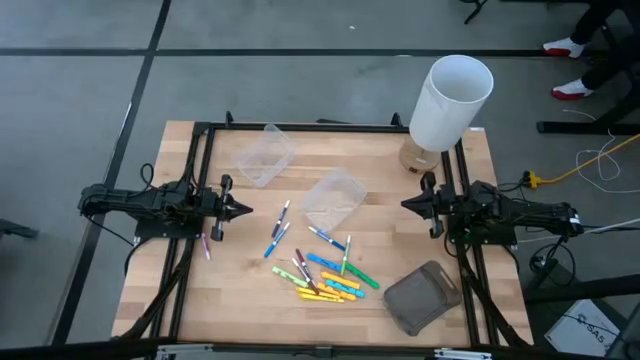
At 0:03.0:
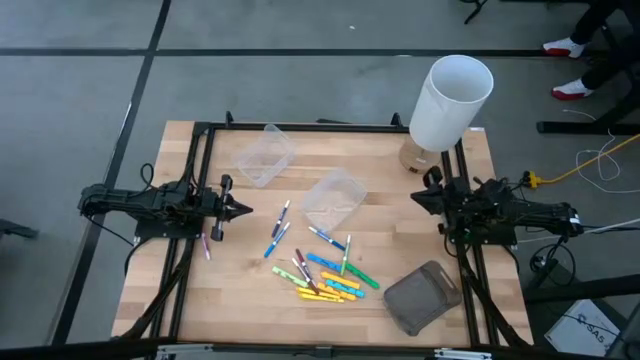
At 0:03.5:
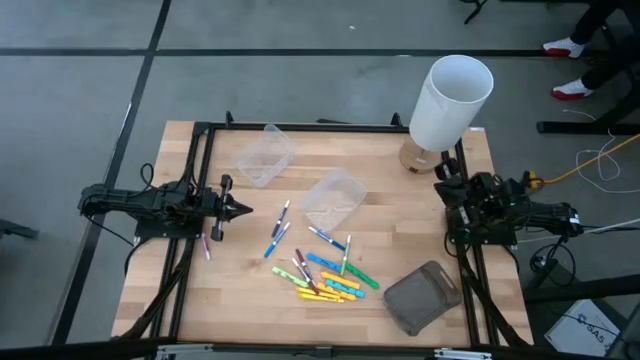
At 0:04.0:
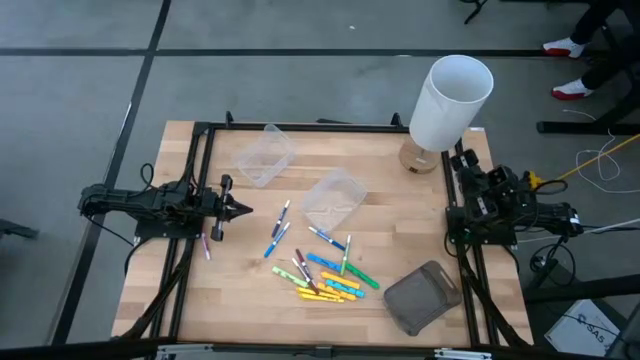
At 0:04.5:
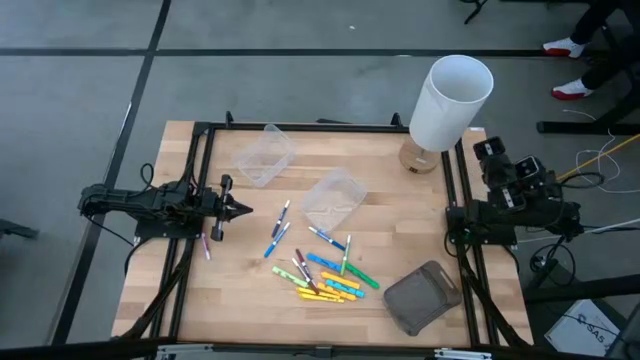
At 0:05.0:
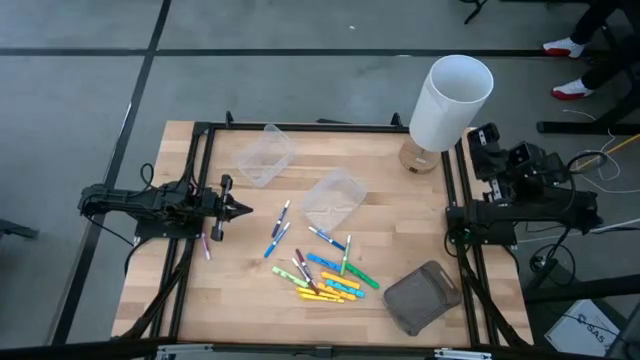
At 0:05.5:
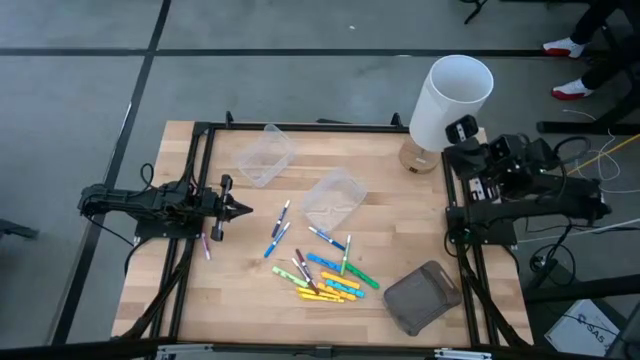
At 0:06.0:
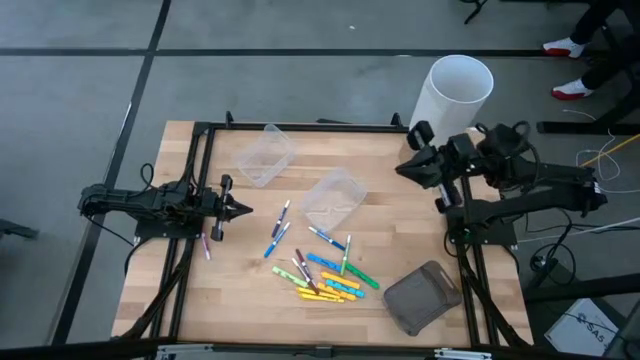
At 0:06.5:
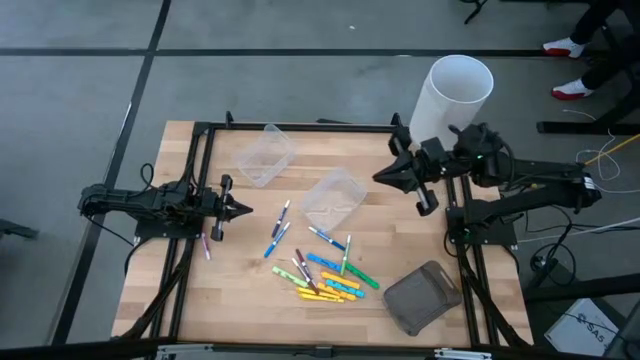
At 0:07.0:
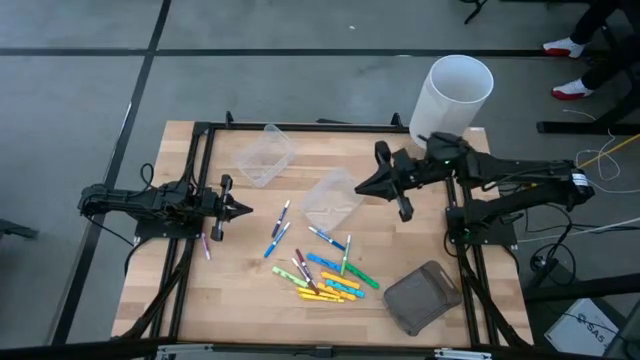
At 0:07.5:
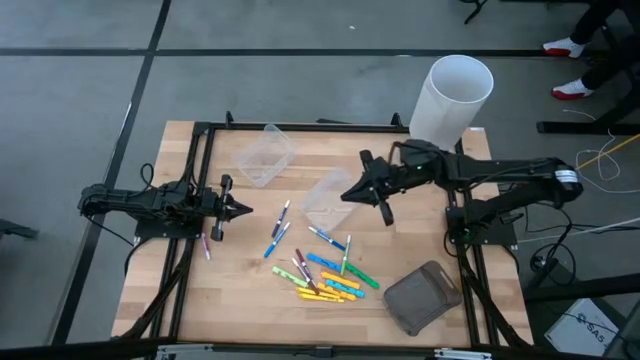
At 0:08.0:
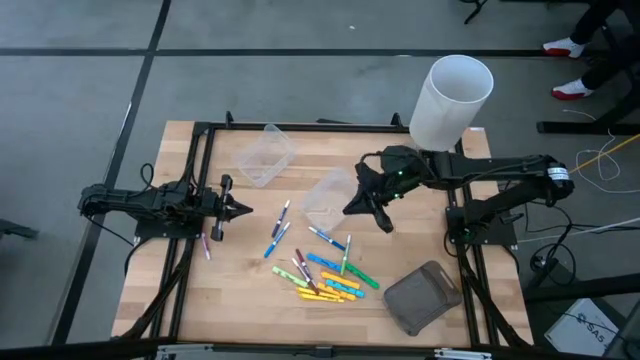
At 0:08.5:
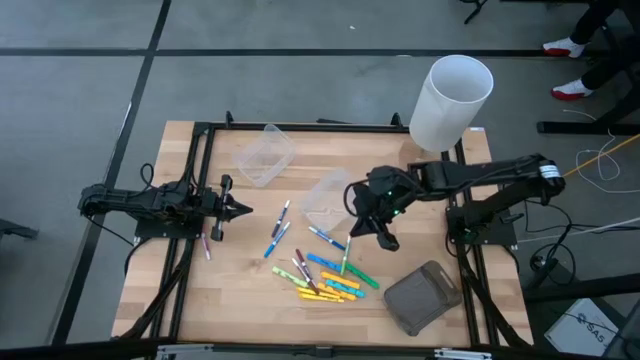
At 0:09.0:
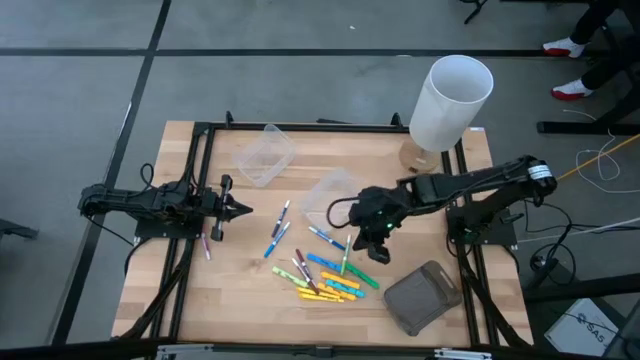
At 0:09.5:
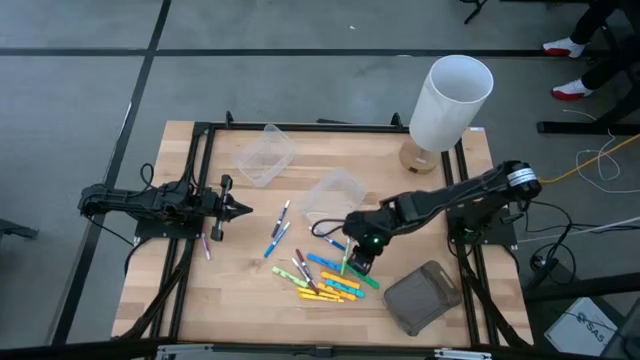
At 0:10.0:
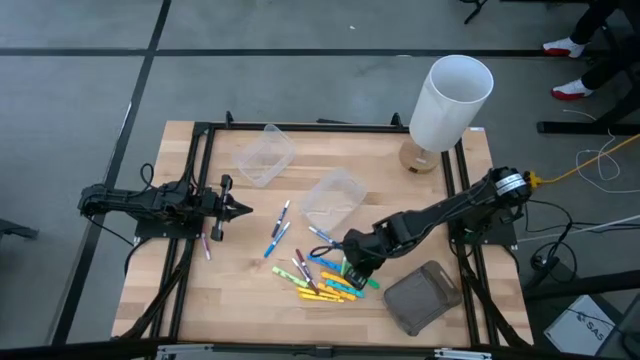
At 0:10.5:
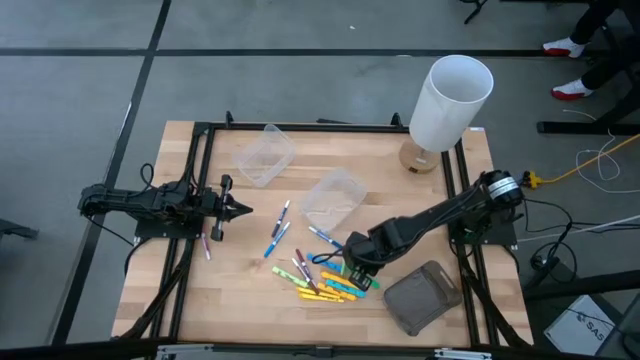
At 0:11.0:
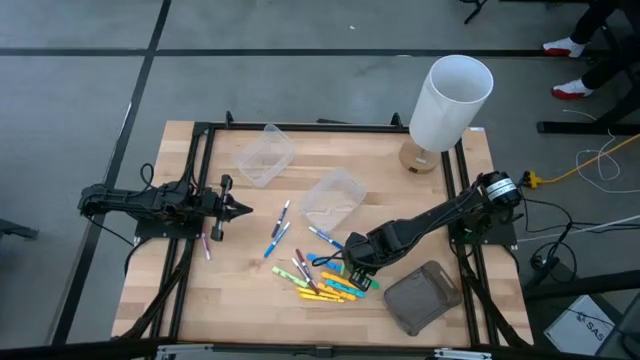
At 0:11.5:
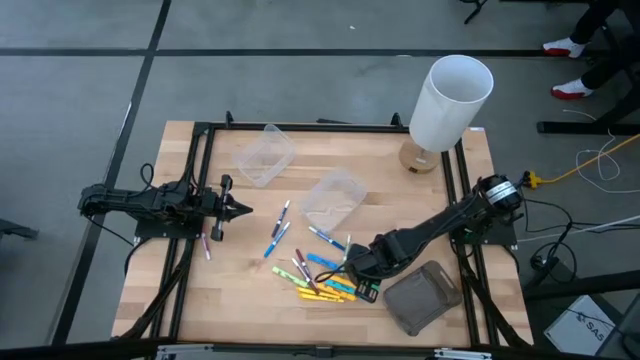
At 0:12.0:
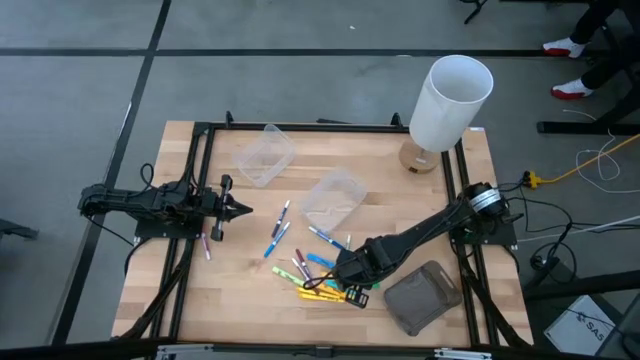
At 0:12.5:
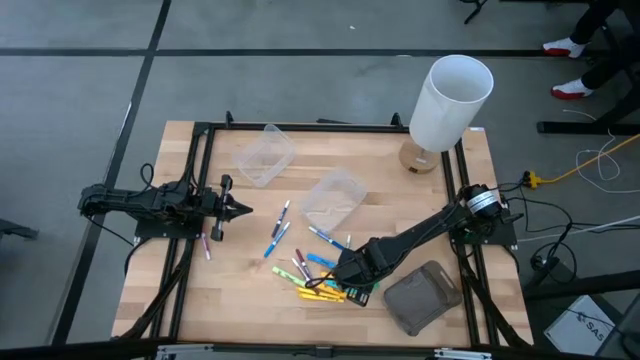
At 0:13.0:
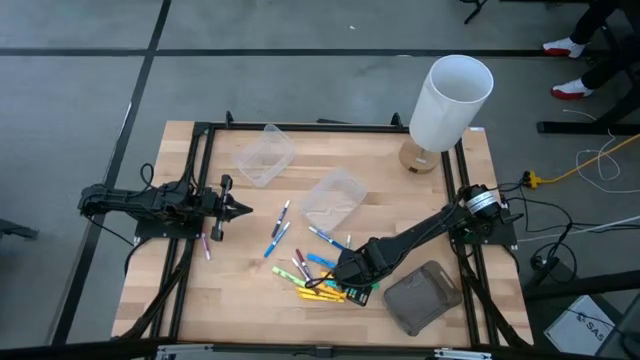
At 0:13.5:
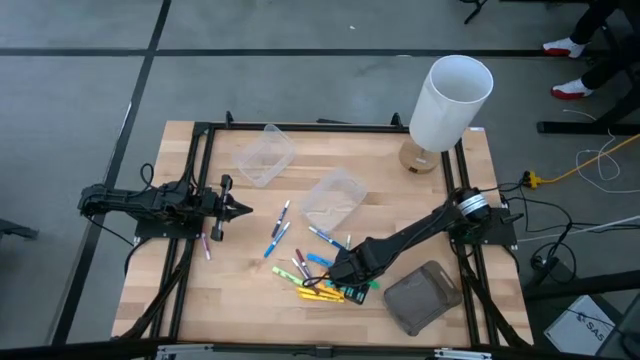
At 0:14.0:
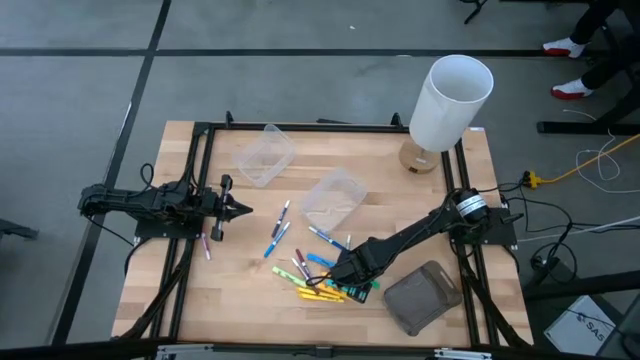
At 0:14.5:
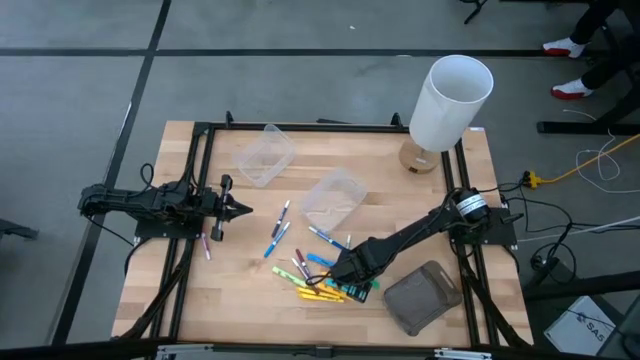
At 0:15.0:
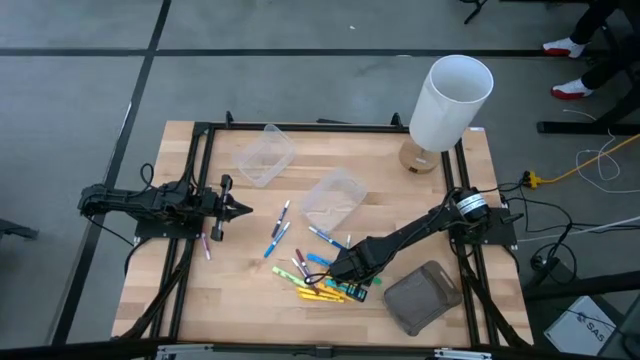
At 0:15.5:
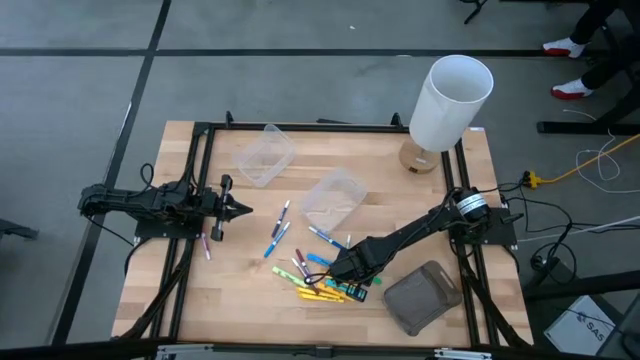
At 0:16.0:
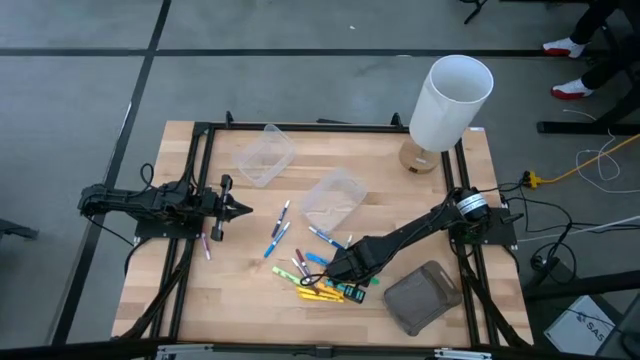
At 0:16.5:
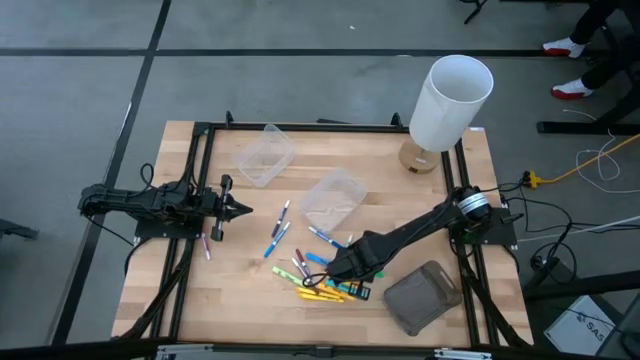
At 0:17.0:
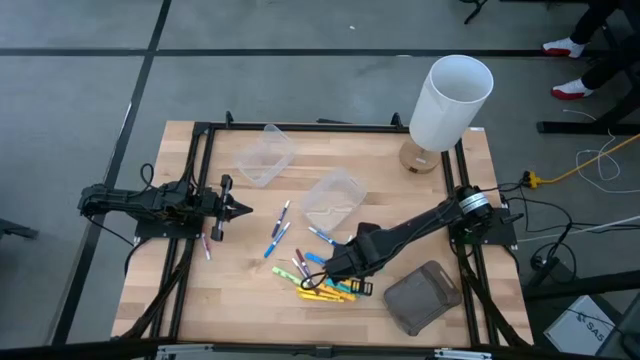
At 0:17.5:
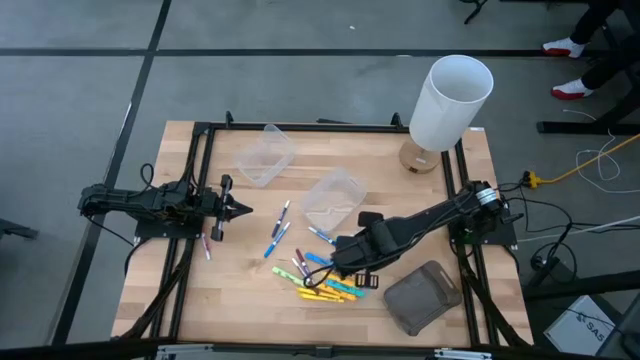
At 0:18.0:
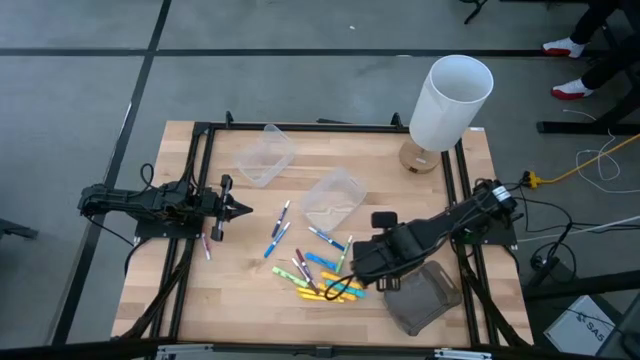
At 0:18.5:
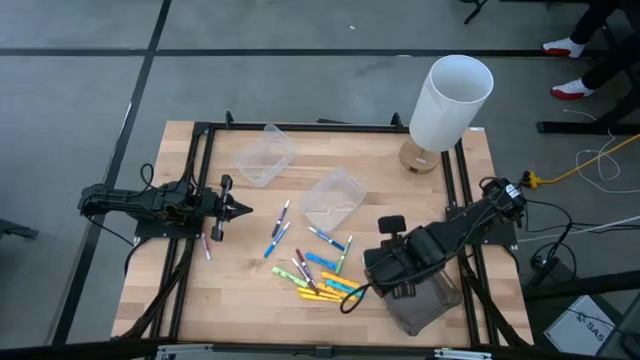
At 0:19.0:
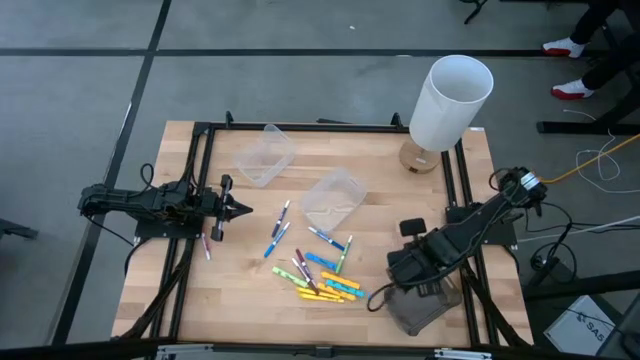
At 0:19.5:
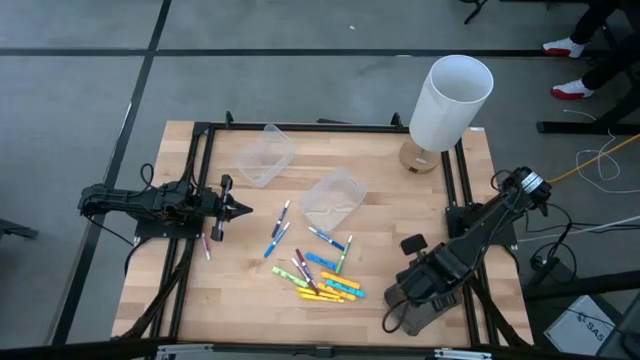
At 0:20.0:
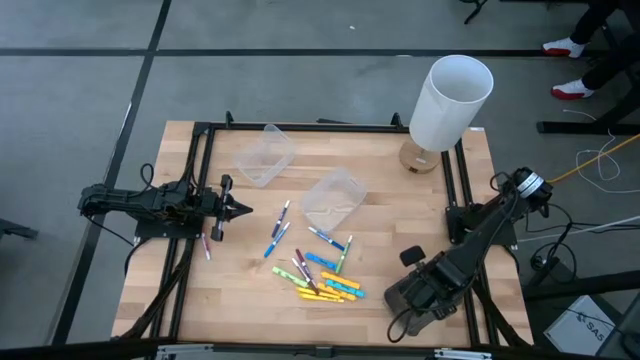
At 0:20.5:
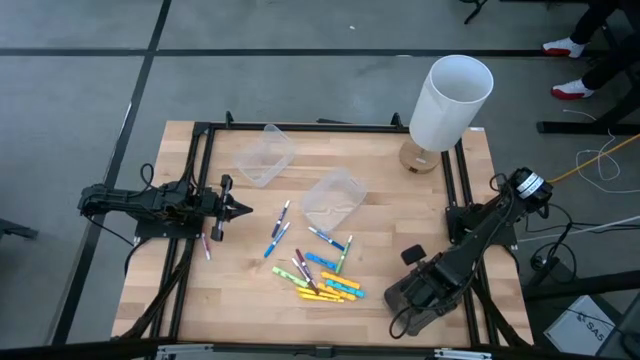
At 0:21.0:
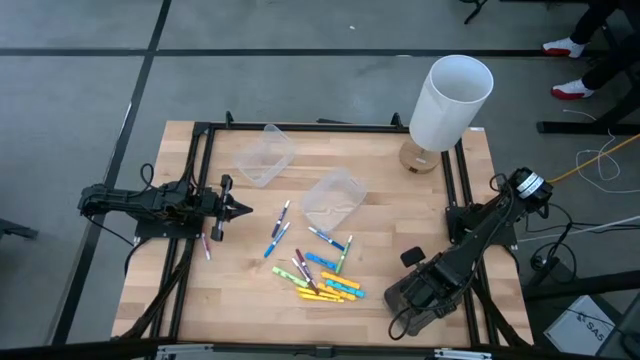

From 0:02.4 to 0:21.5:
Task: Pick & Place Markers
Put the green highlighter into the black bin

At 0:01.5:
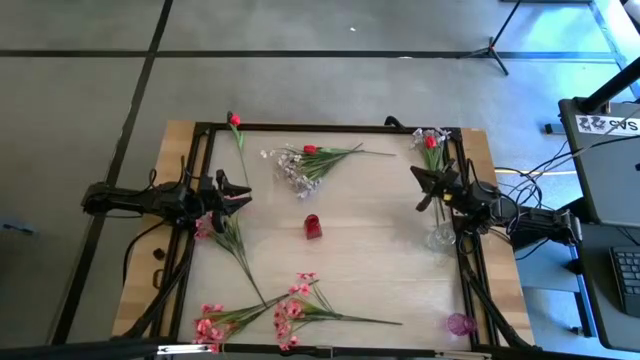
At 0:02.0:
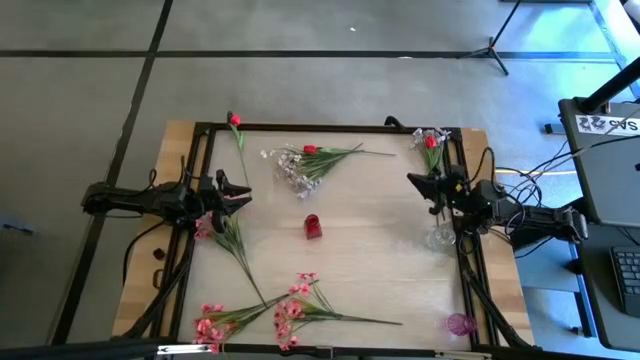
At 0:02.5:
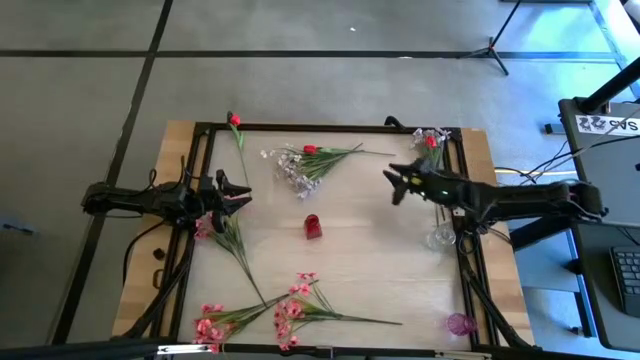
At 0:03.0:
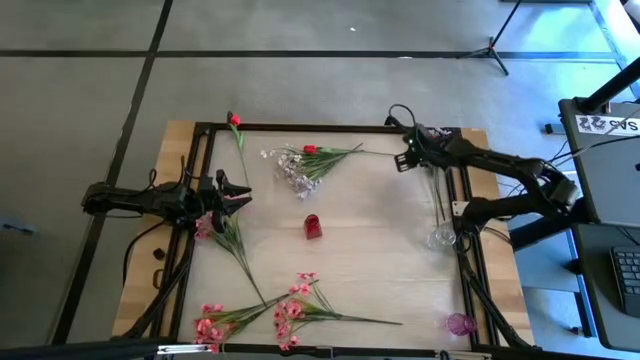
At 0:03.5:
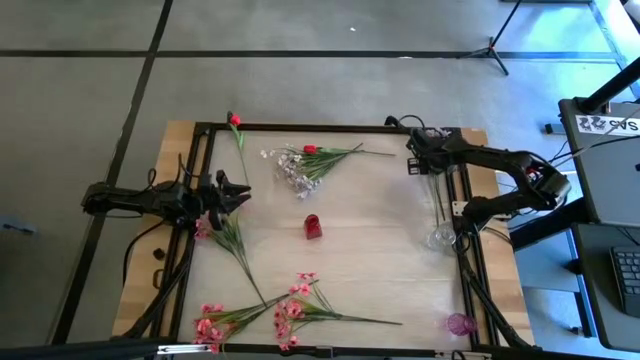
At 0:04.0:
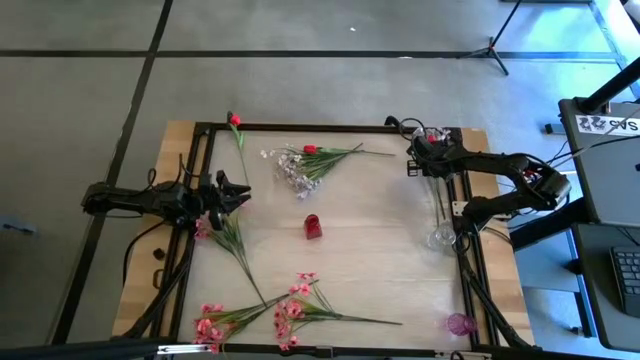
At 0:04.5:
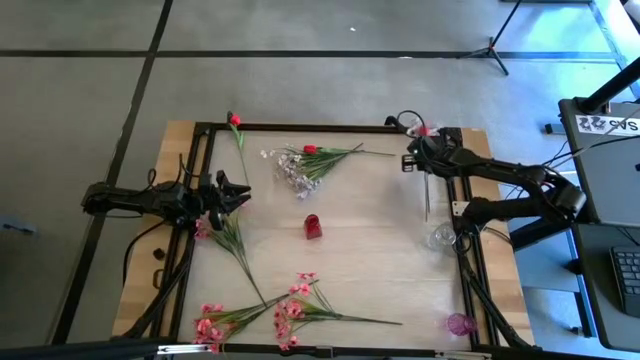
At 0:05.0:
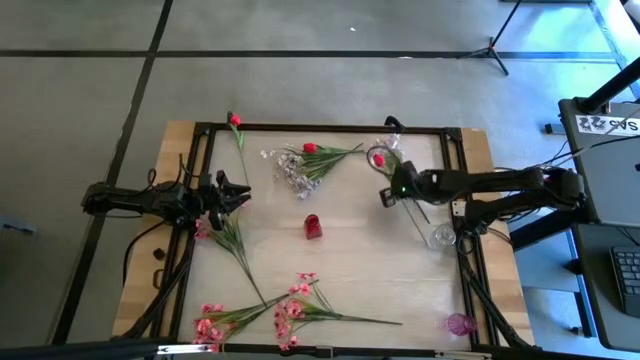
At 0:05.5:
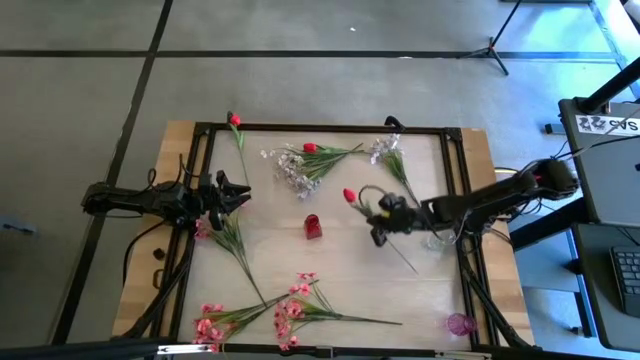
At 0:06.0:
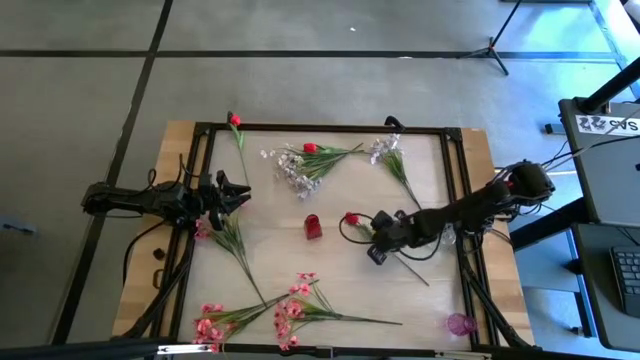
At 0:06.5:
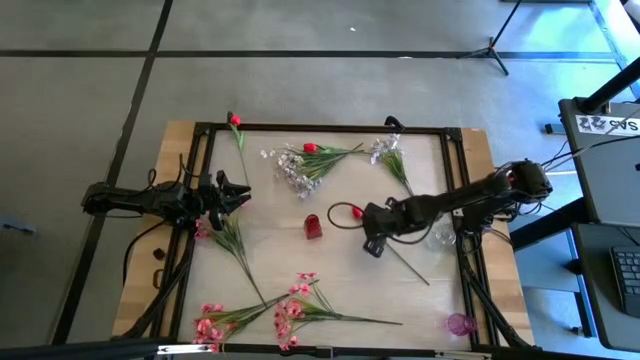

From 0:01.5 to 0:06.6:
Task: Sort flowers into vase by color
Put the right red tulip into the red vase
